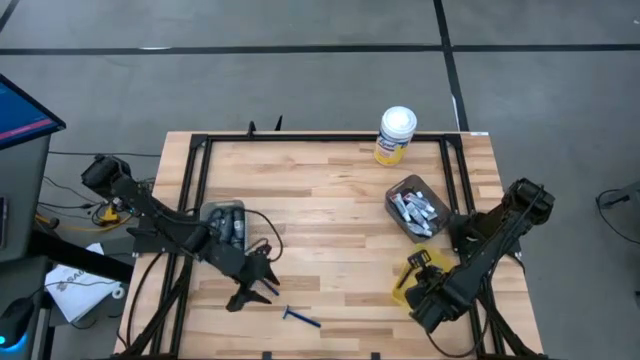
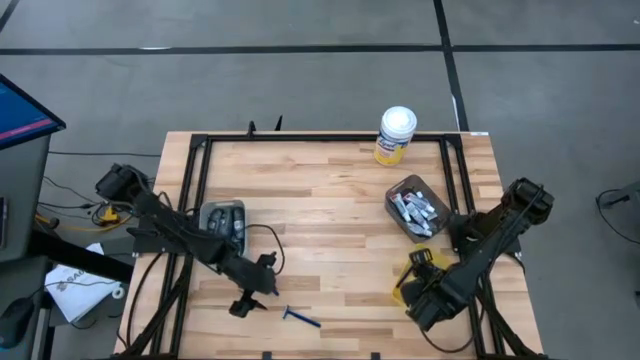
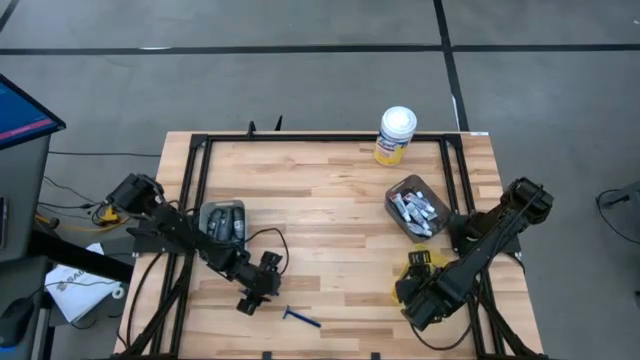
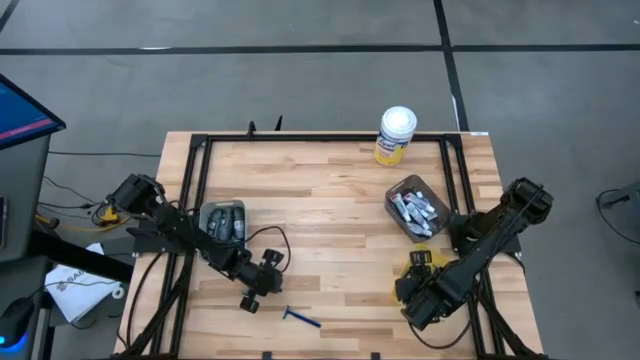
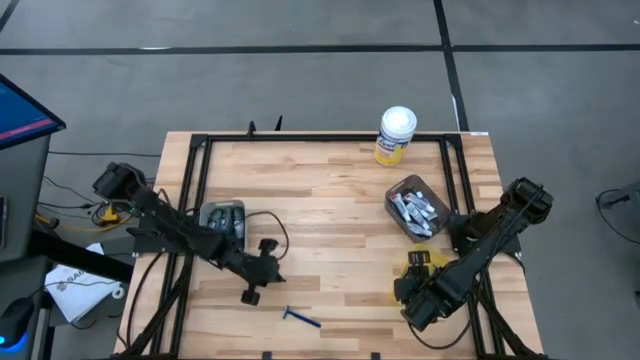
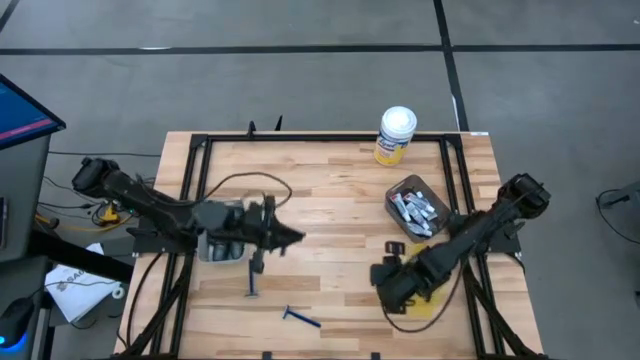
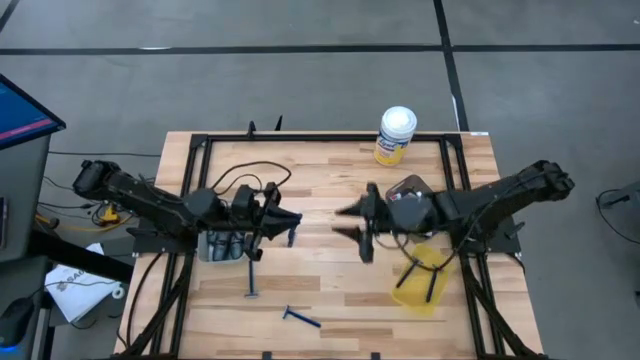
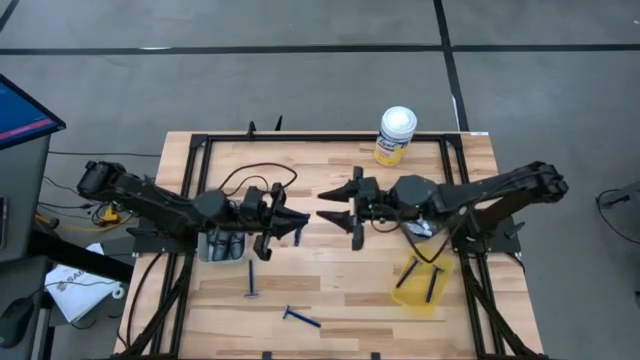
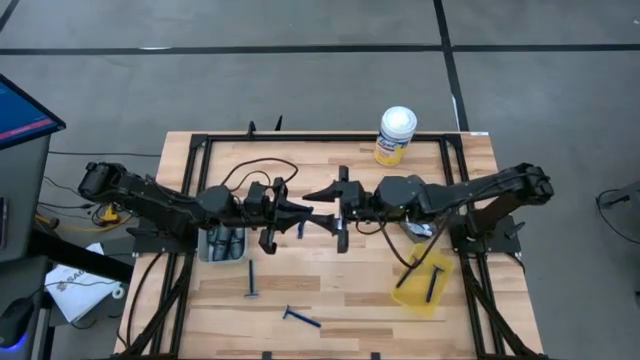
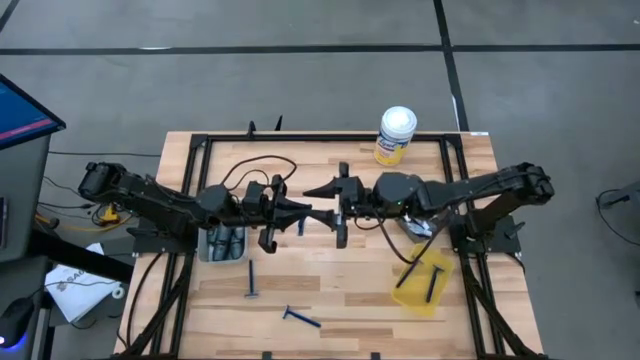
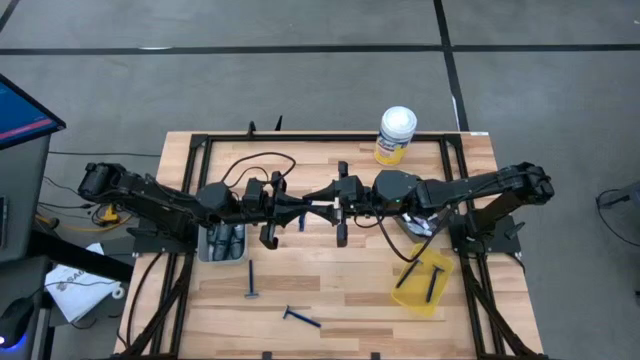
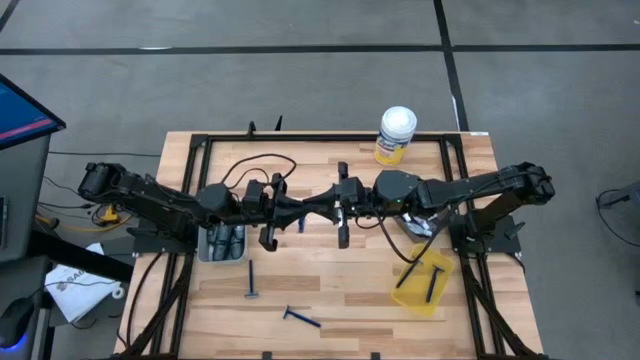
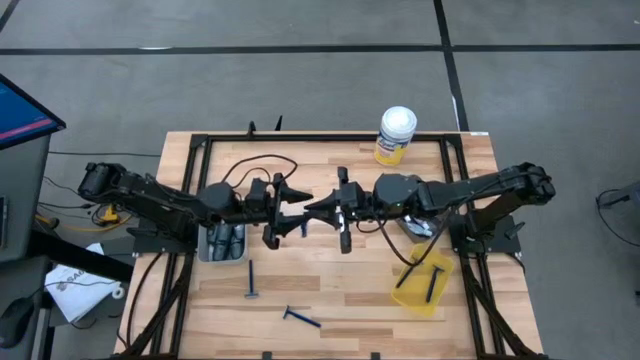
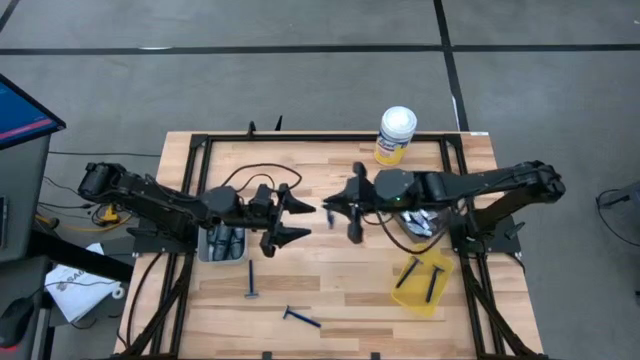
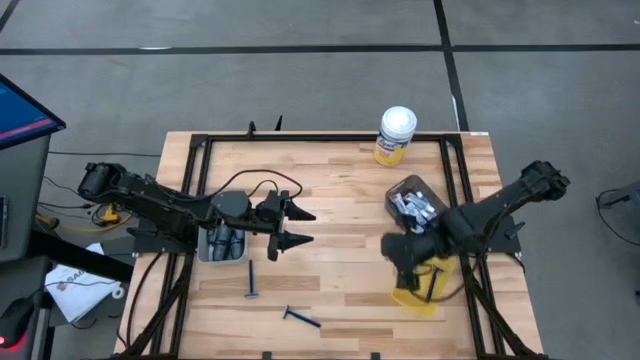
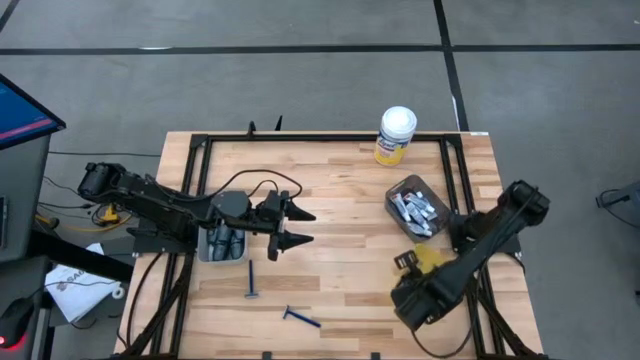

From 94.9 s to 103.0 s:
Task: Pick & Place Travel size toiletries
Put the blue razor into the yellow bin

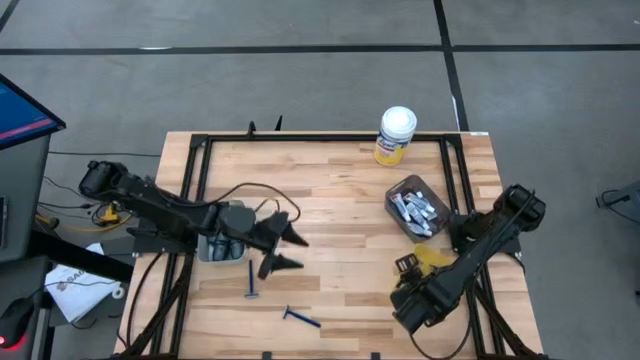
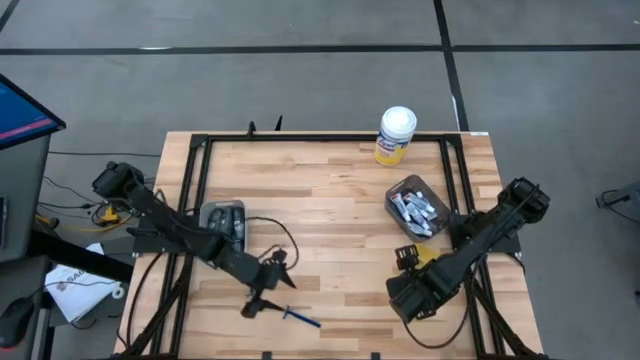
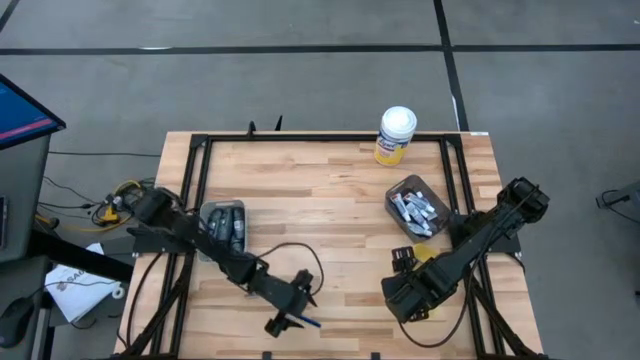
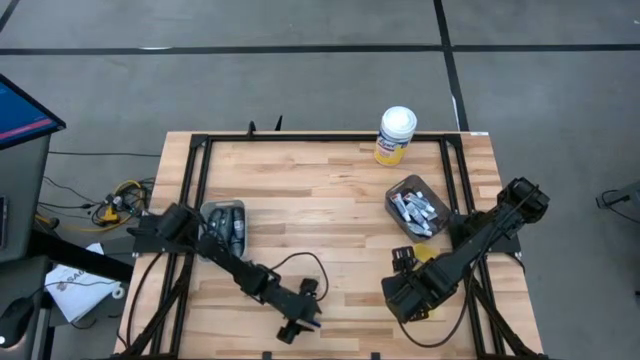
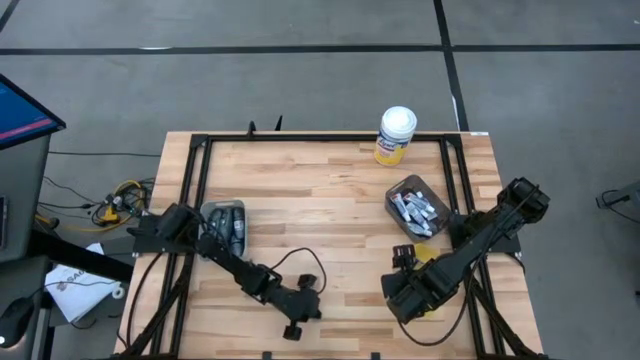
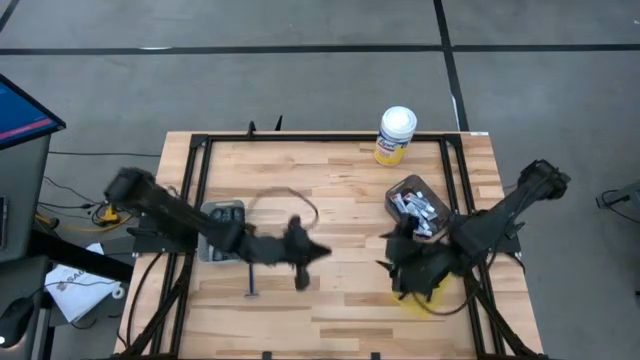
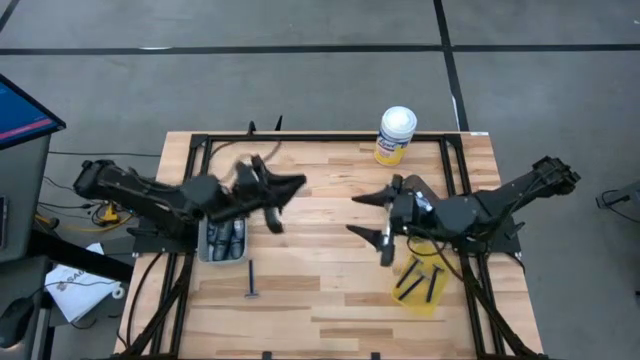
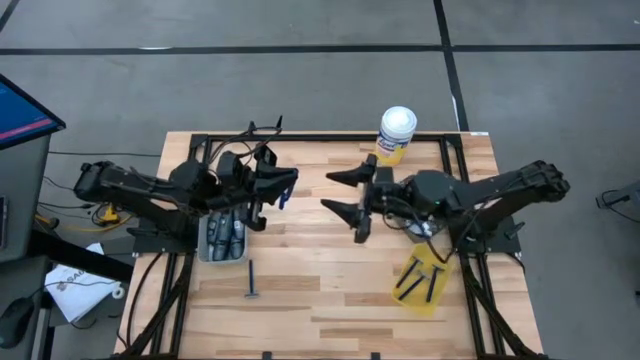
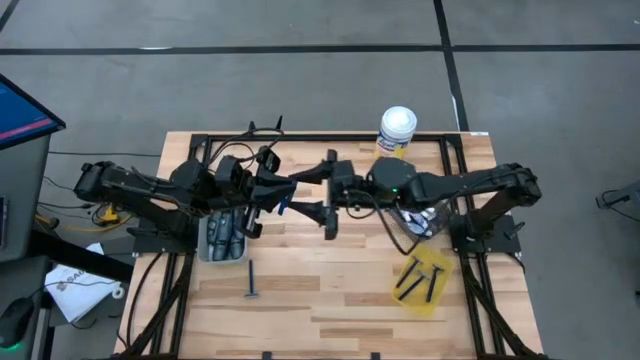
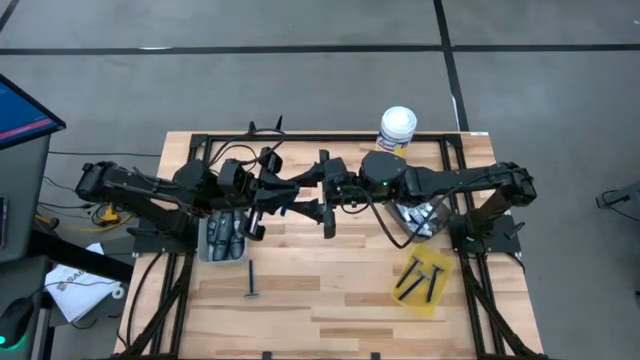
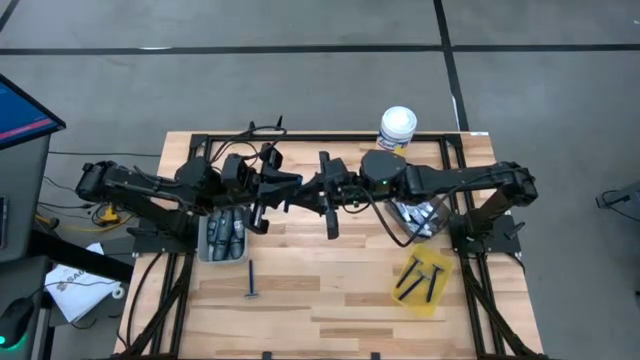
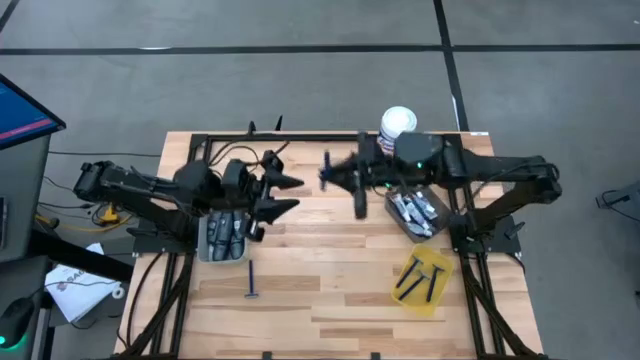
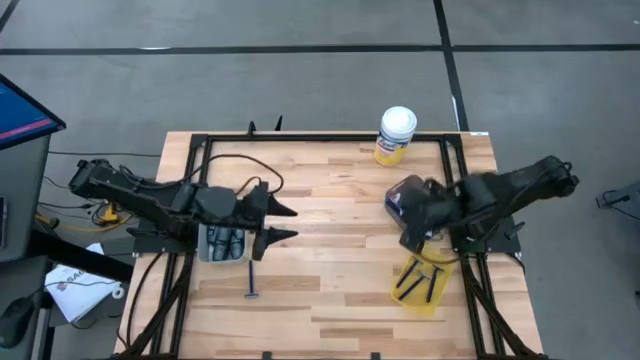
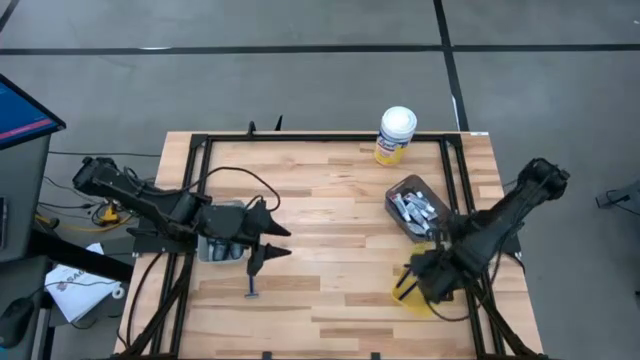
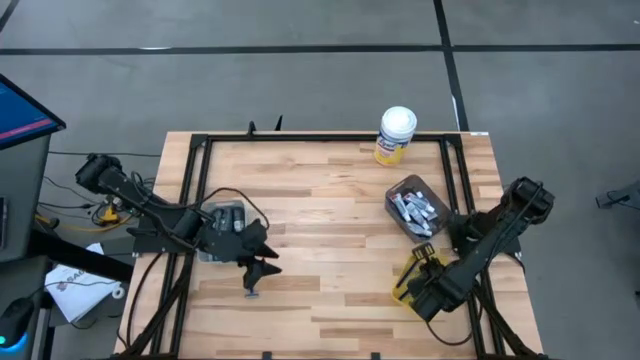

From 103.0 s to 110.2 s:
Put the blue razor into the yellow bin

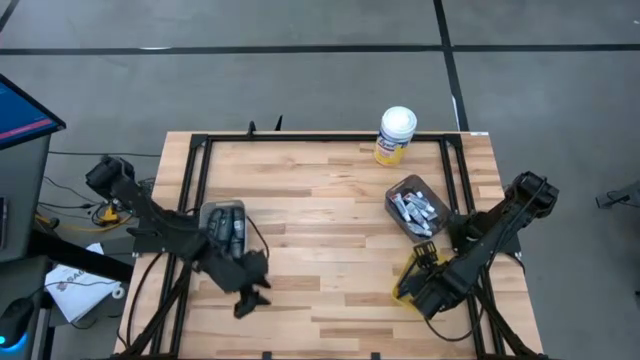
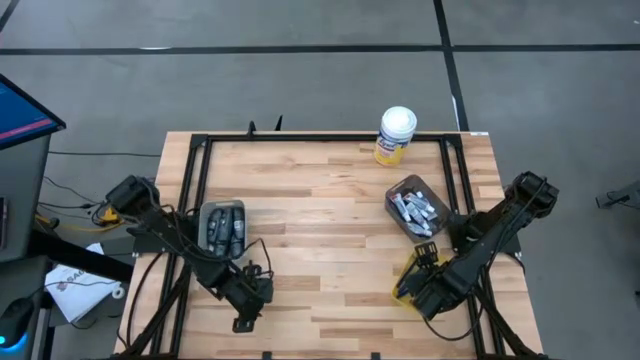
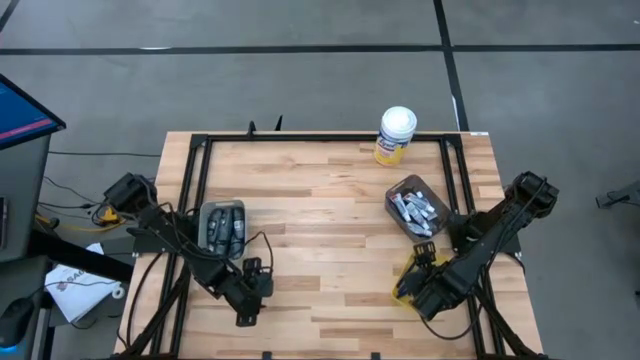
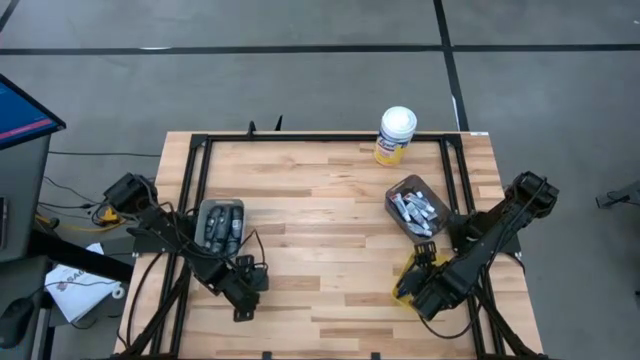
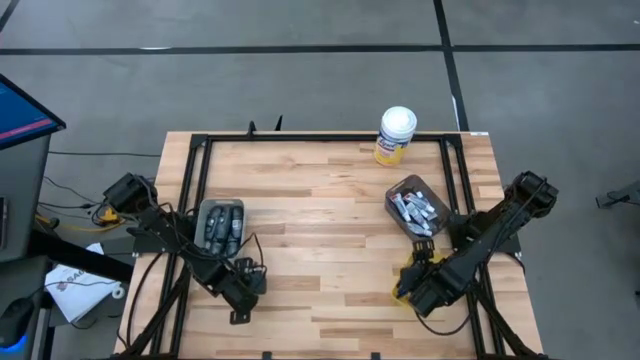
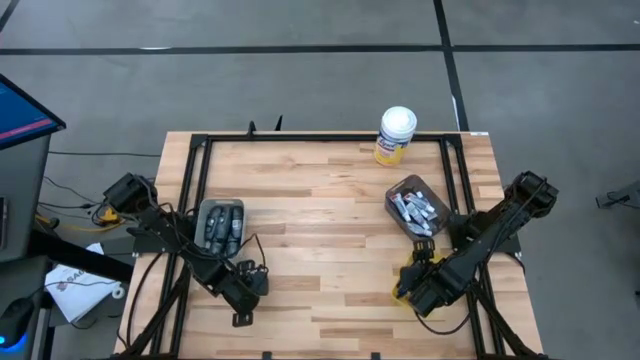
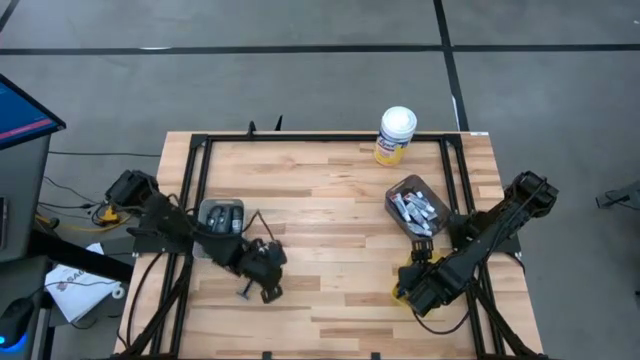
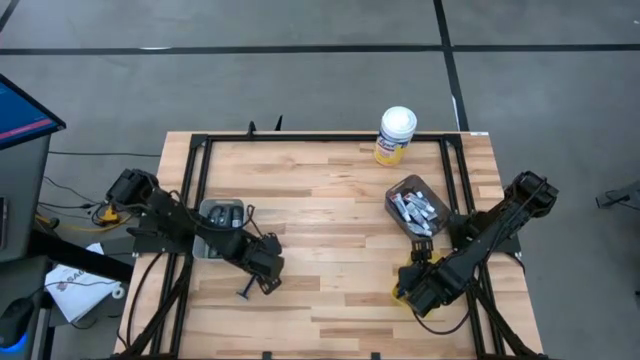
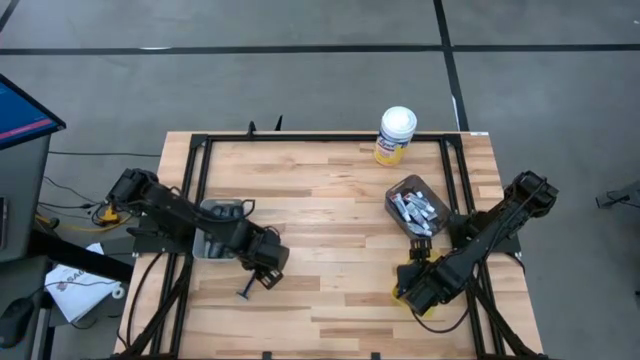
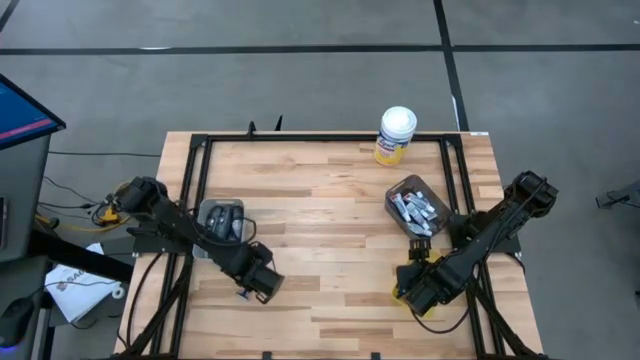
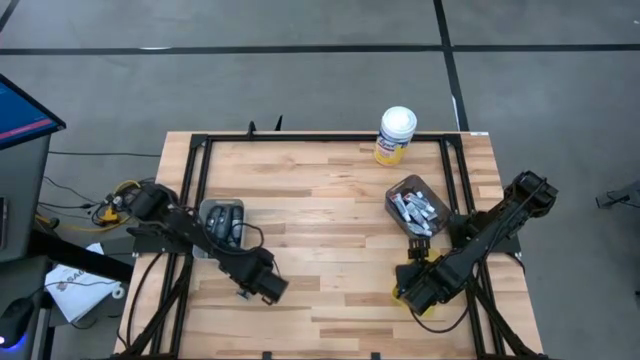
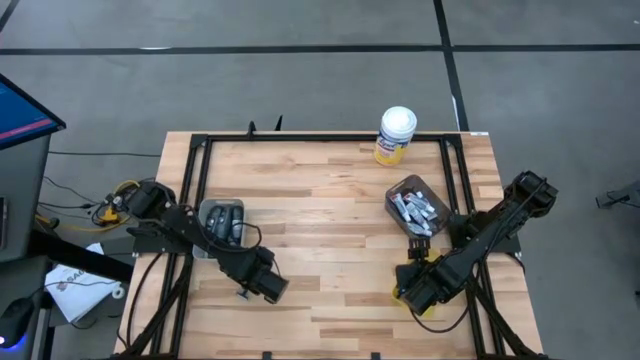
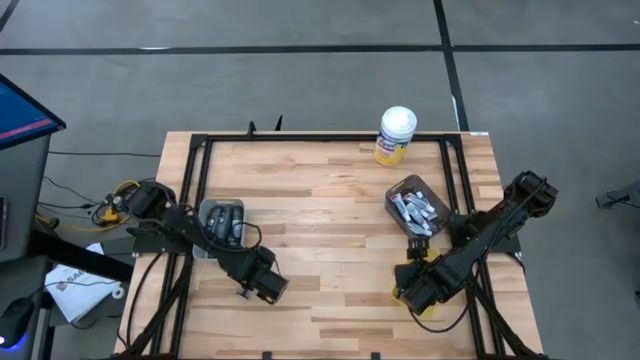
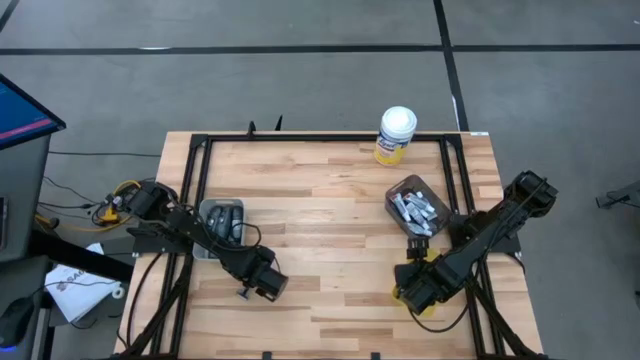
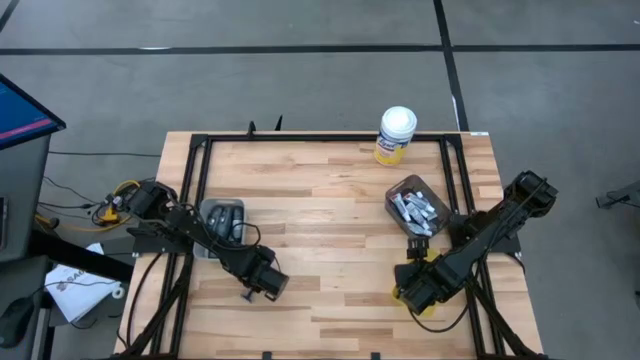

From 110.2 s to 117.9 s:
Put the blue razor into the yellow bin
